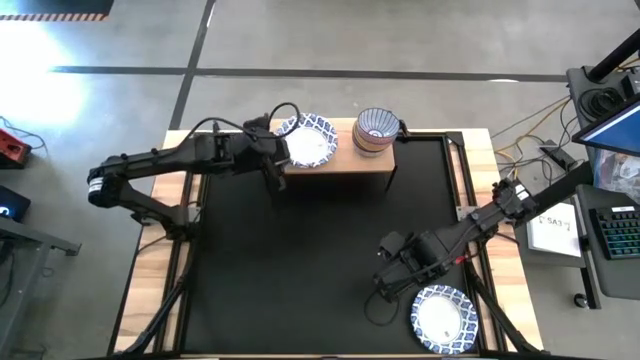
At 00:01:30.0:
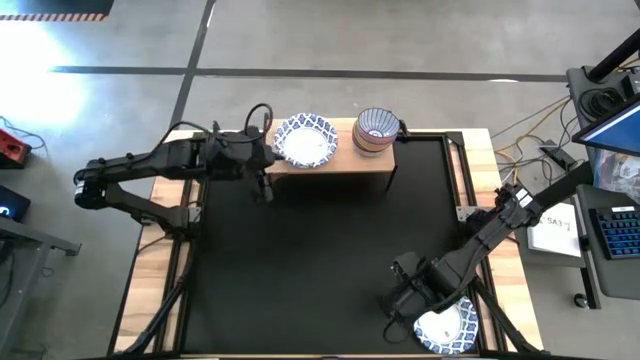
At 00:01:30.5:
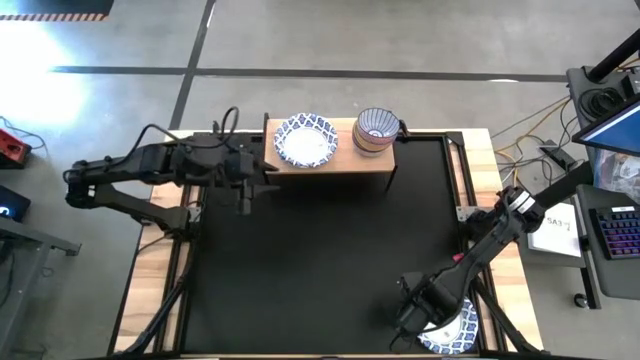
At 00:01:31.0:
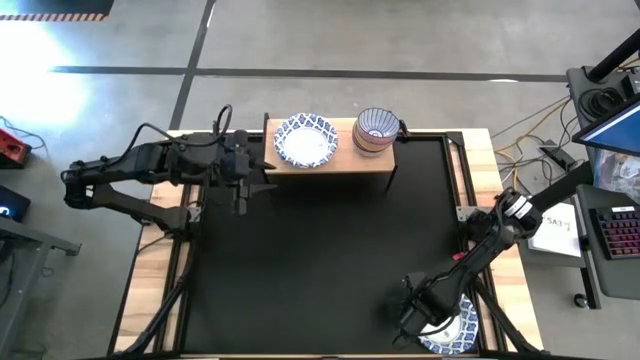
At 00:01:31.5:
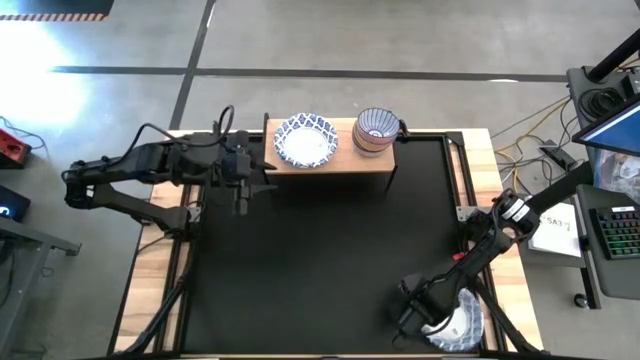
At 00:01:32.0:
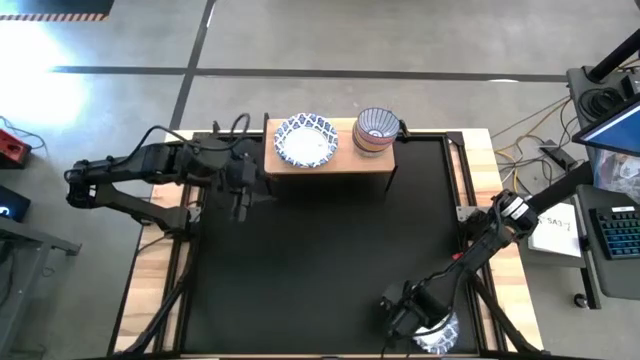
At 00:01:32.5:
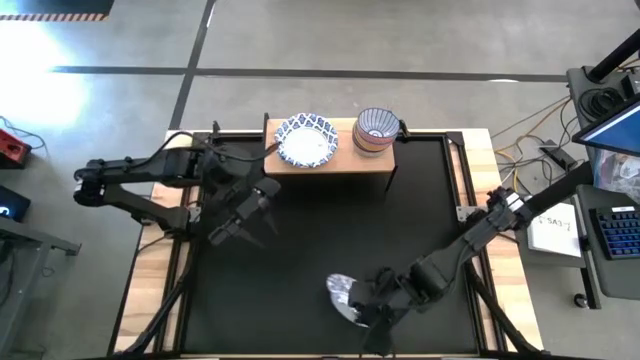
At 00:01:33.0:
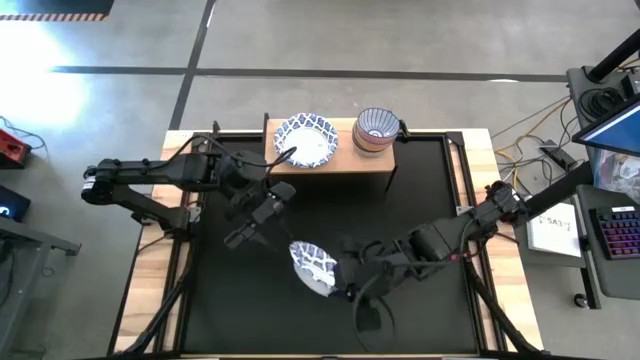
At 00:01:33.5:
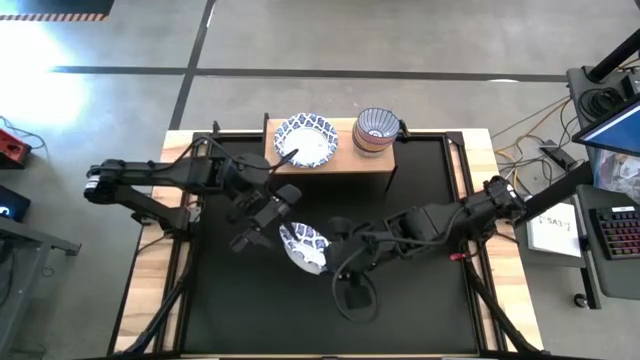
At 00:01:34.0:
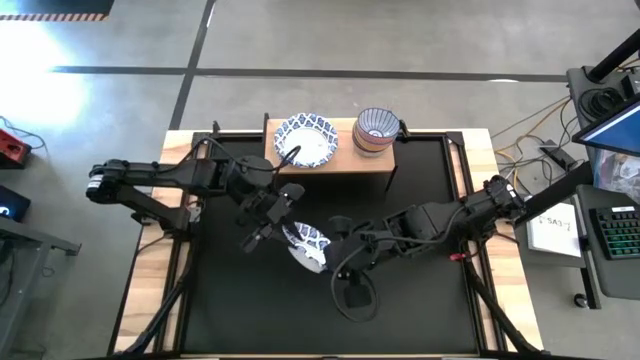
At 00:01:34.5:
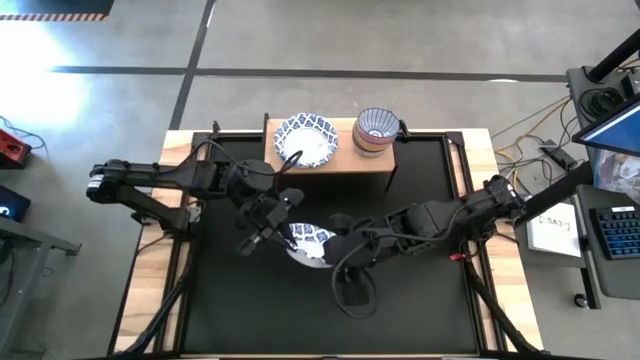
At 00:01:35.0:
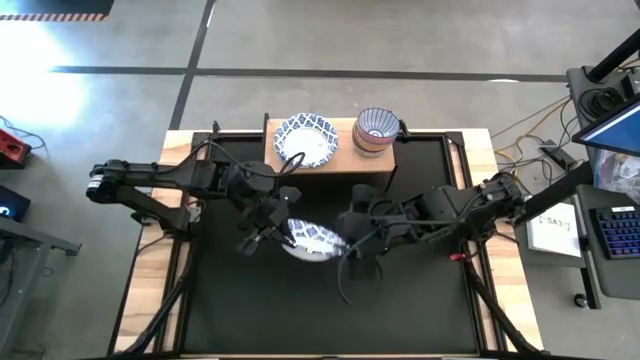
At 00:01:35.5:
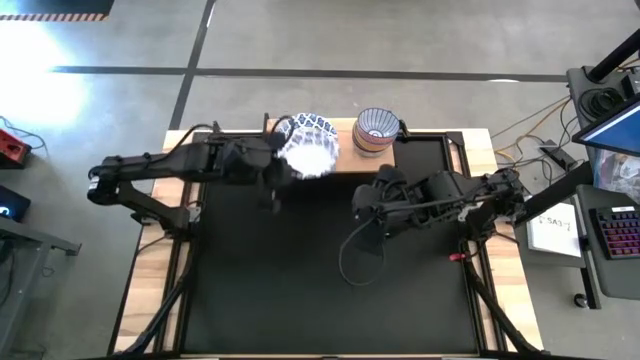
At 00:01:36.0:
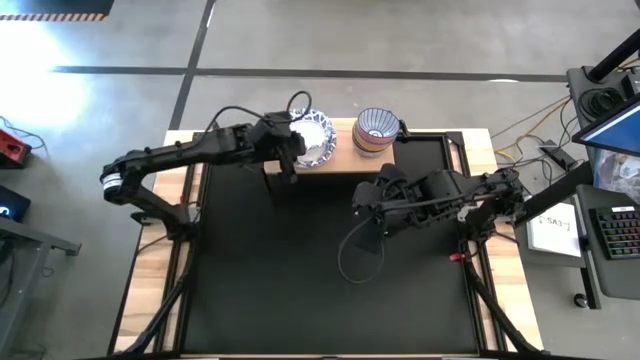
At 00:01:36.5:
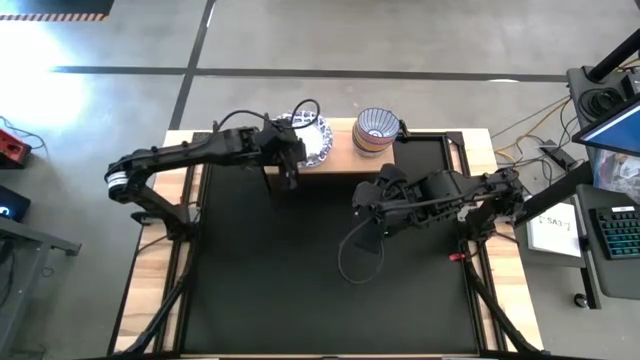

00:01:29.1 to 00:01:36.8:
Task: Place and stack bowls onto a shelf
Stack the white and blue bowl on top of the white and blue bowl on the shelf

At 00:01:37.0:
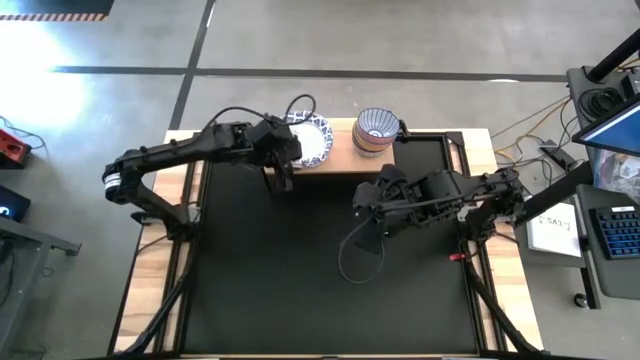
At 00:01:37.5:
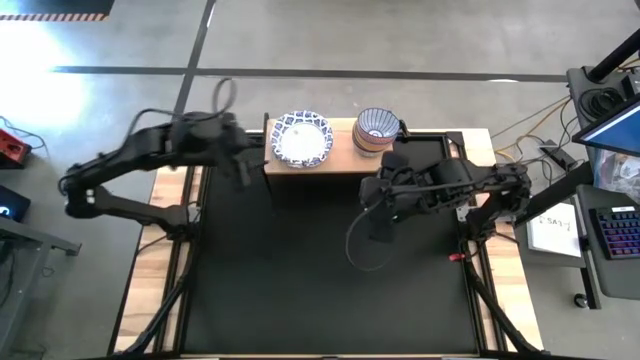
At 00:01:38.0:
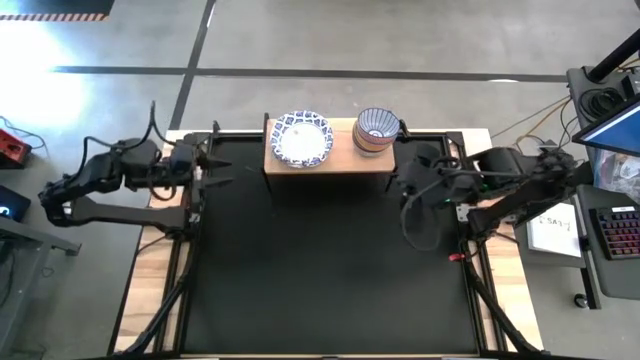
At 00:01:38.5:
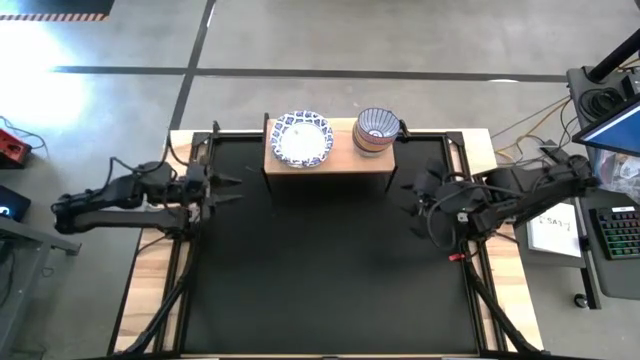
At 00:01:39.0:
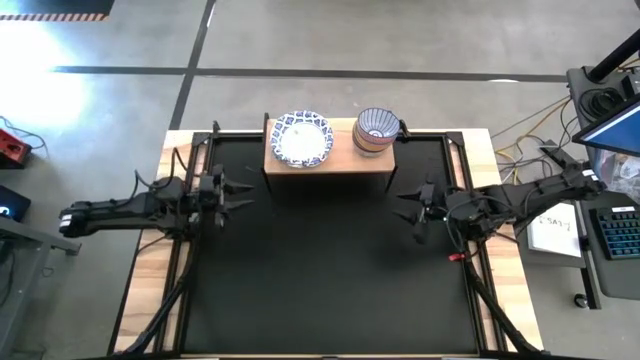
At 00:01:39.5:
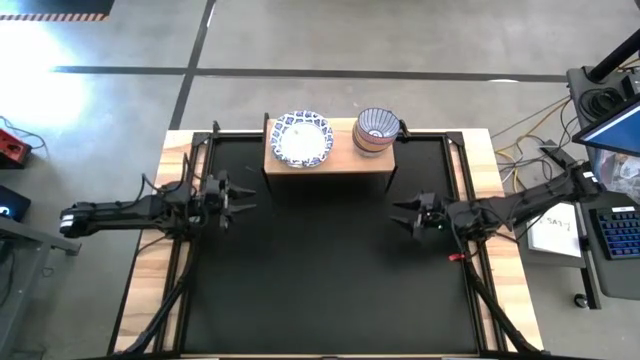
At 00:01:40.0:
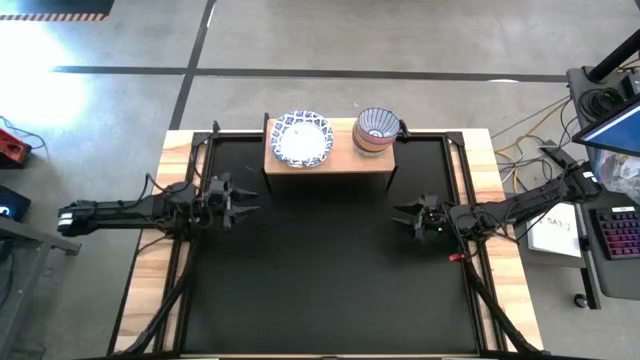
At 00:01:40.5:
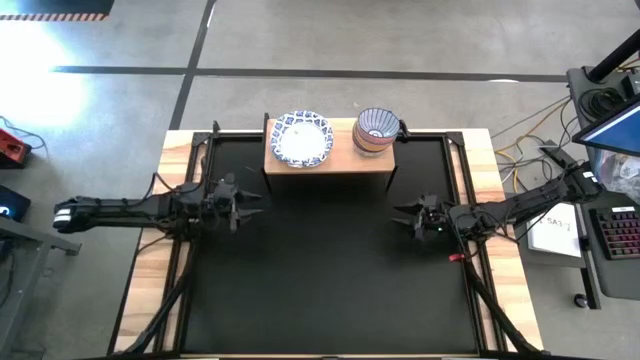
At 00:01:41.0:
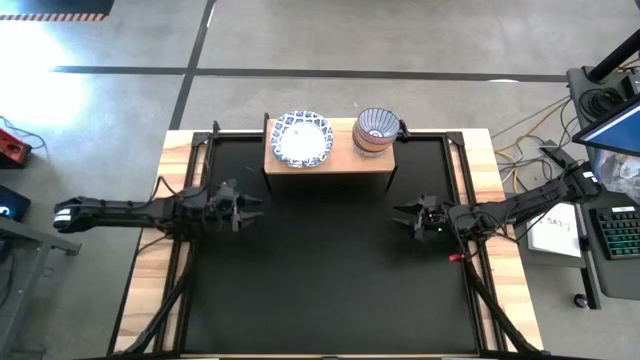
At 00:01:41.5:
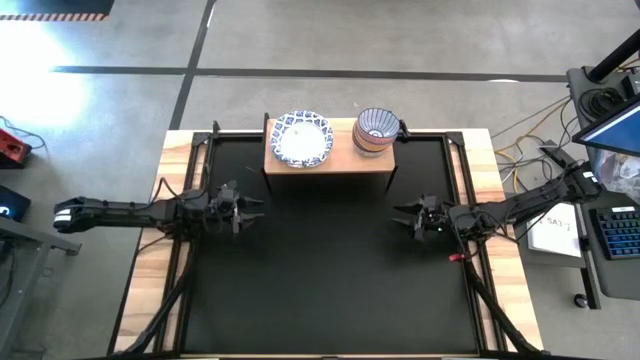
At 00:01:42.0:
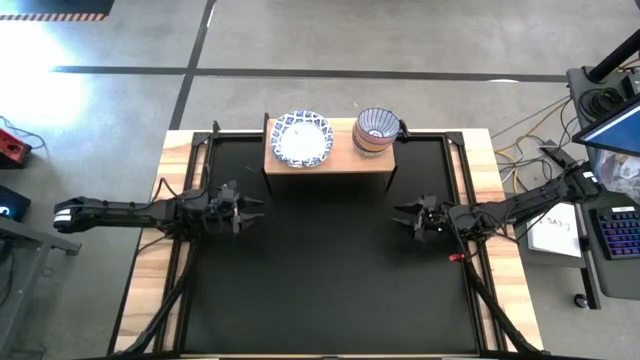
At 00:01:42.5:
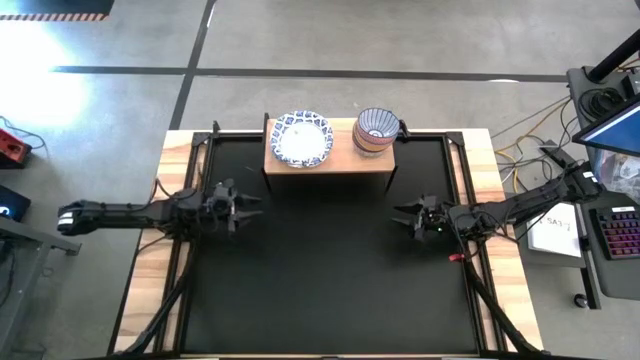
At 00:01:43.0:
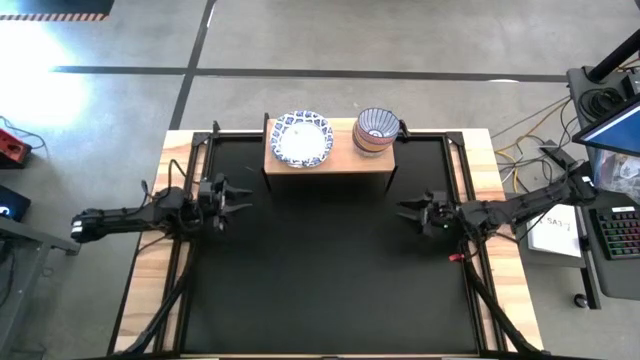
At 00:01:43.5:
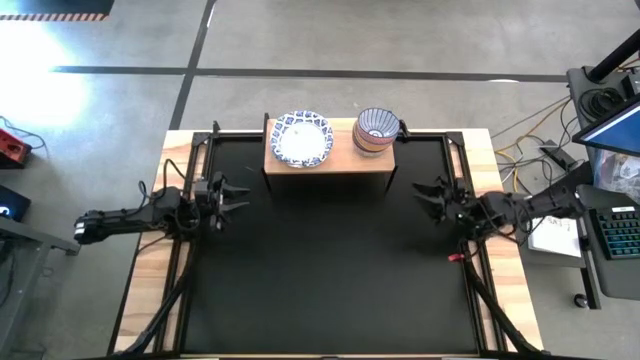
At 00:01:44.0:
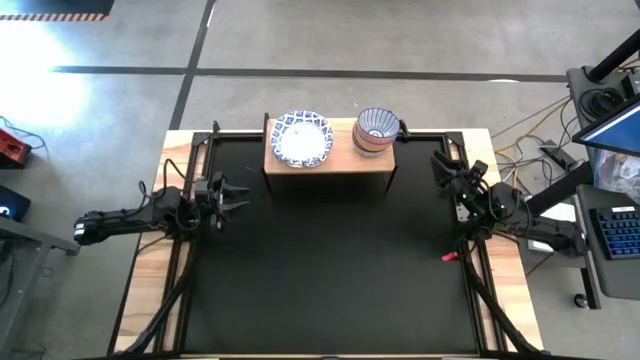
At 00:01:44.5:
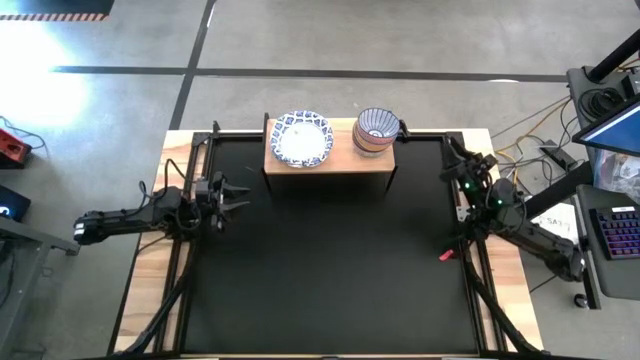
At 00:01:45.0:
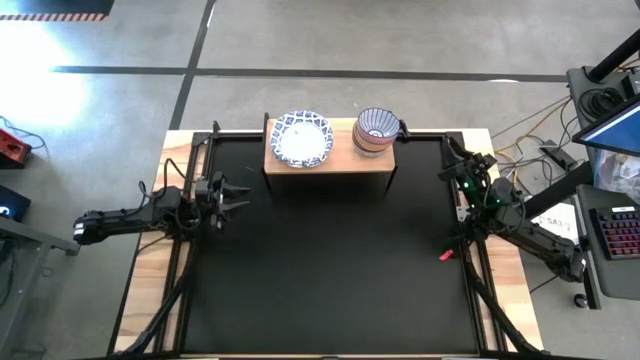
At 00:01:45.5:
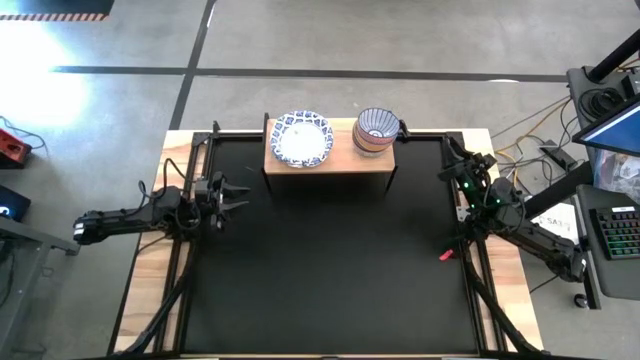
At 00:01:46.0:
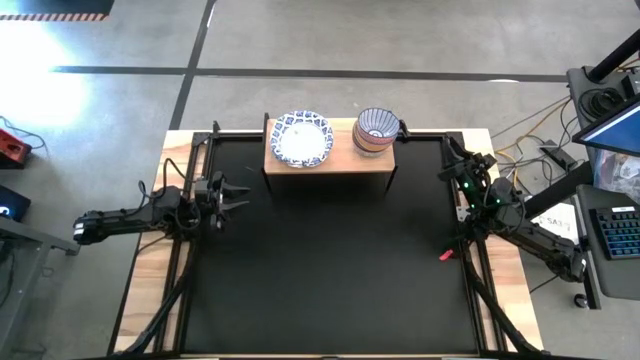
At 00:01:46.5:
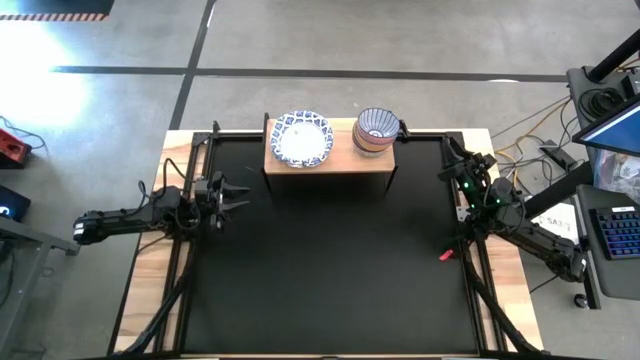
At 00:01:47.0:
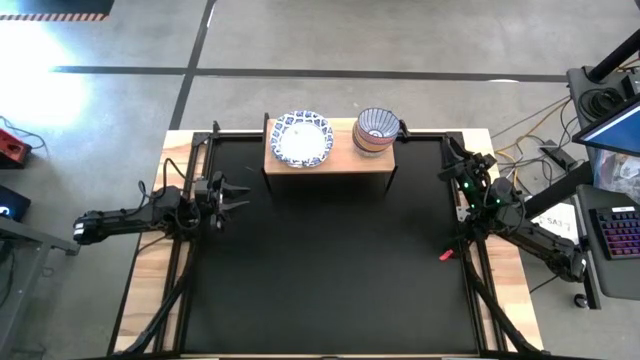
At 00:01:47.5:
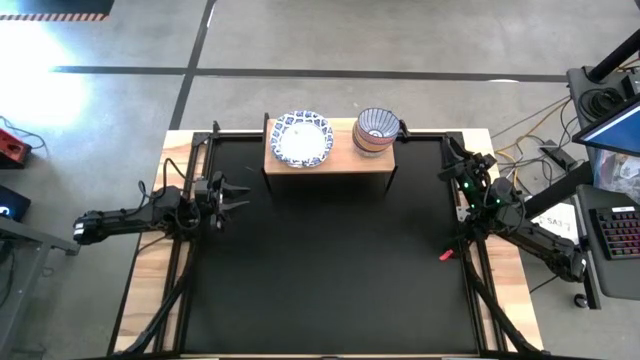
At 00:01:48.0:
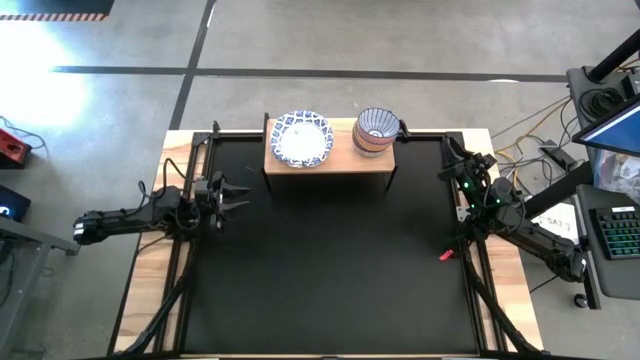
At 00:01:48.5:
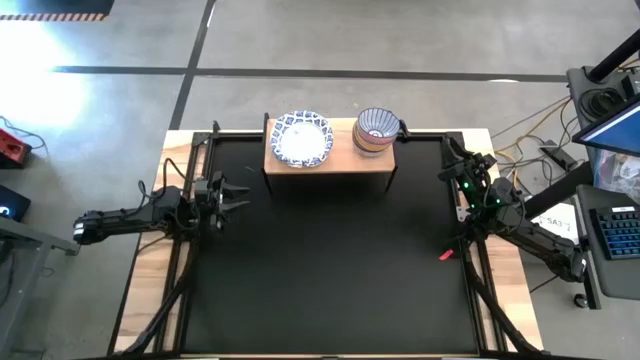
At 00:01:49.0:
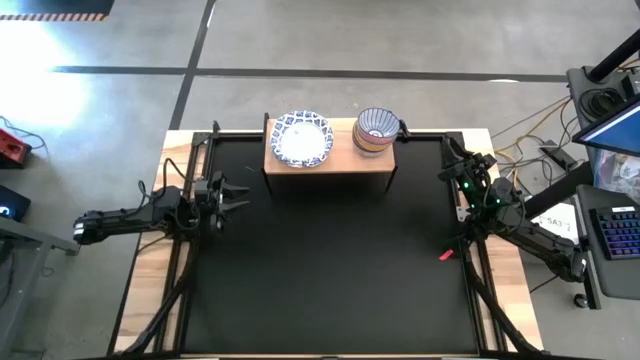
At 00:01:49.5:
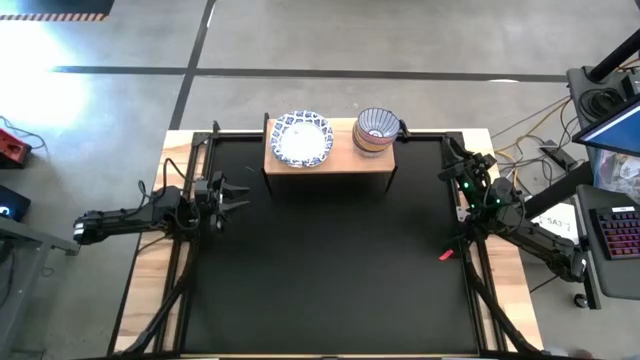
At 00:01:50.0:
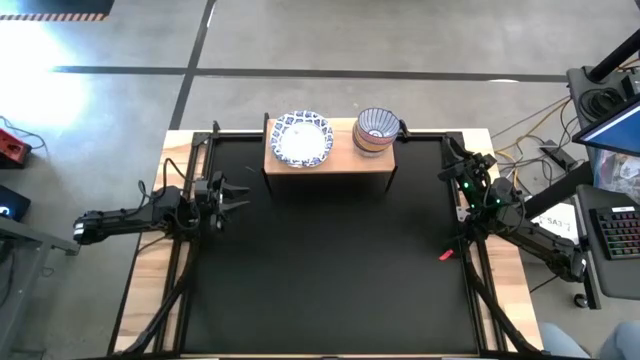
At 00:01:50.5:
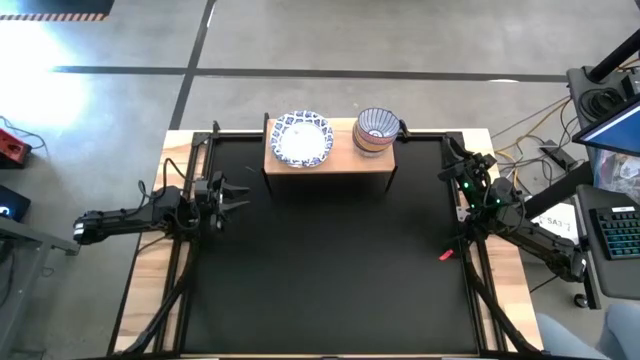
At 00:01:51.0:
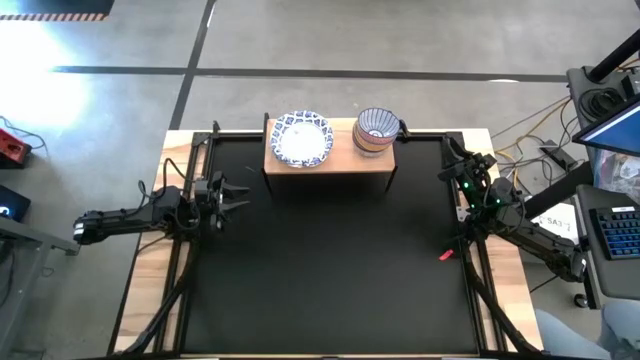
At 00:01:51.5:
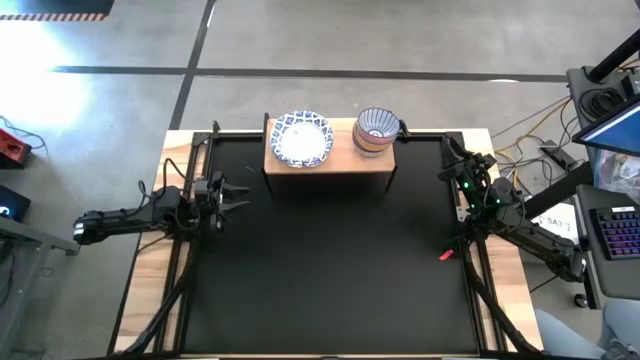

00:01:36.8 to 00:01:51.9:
Return to Home Position
